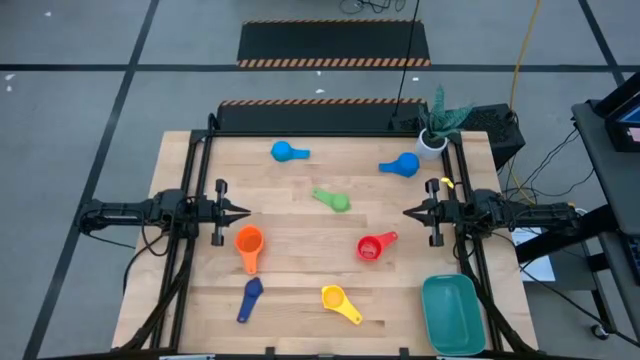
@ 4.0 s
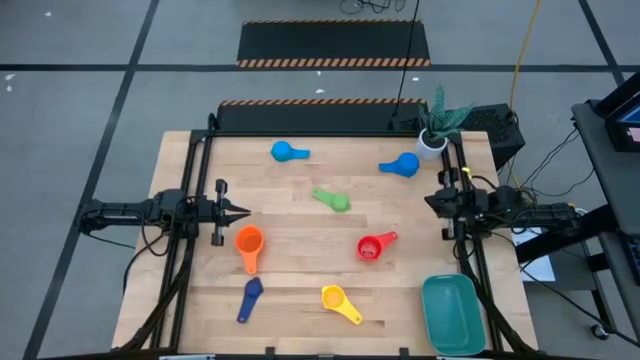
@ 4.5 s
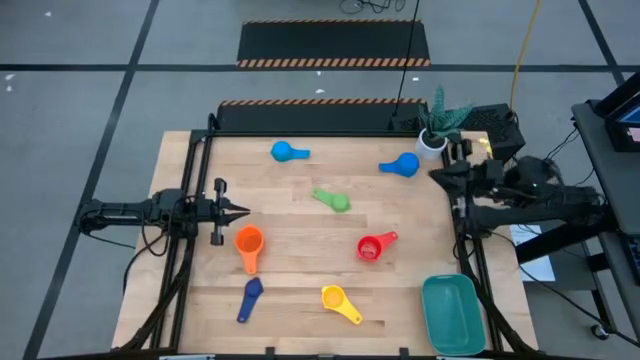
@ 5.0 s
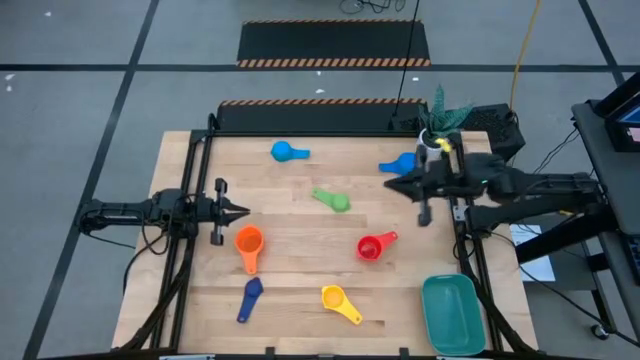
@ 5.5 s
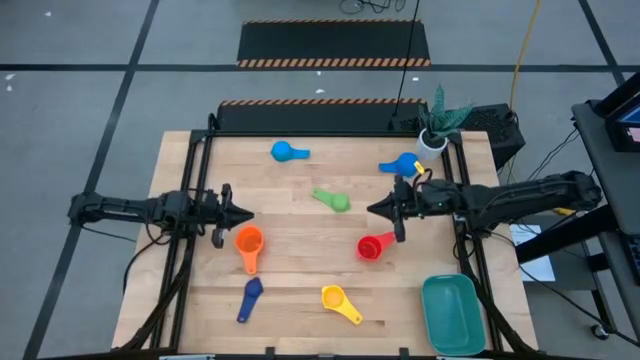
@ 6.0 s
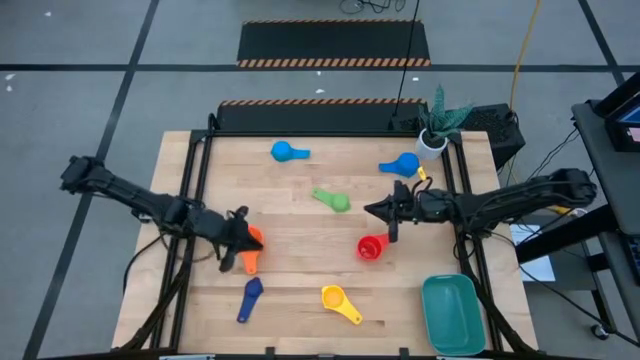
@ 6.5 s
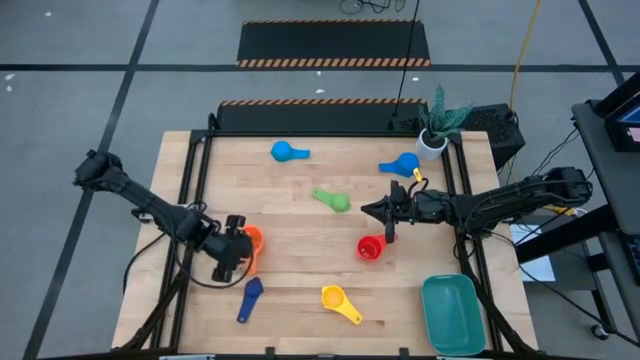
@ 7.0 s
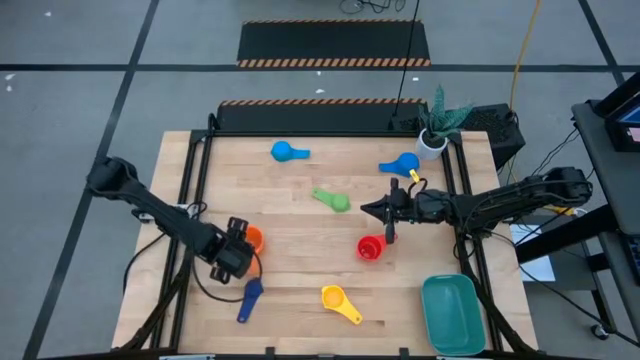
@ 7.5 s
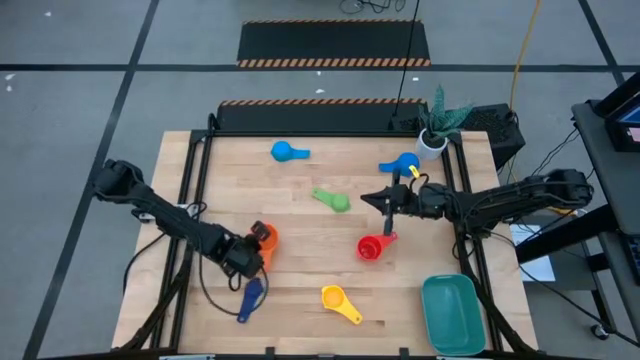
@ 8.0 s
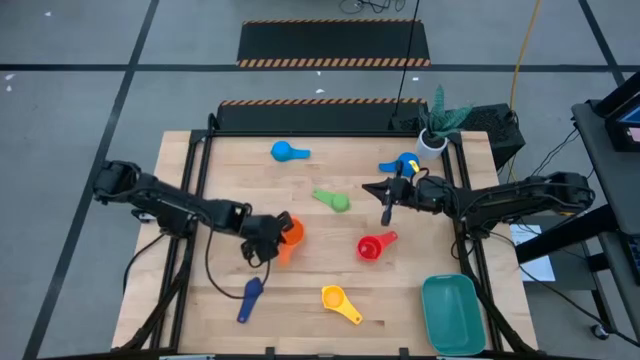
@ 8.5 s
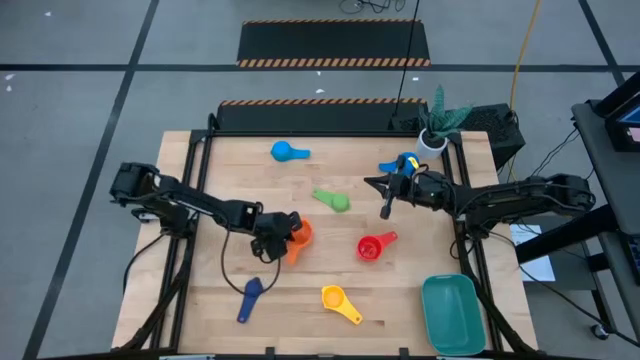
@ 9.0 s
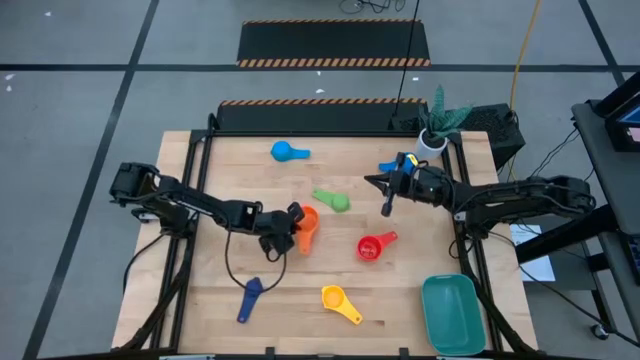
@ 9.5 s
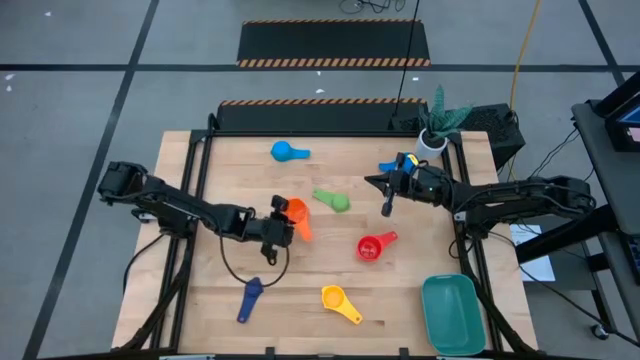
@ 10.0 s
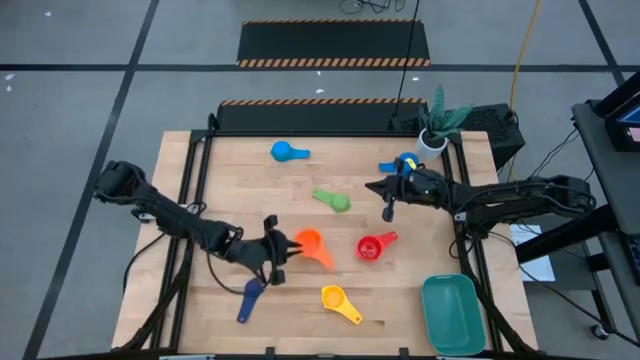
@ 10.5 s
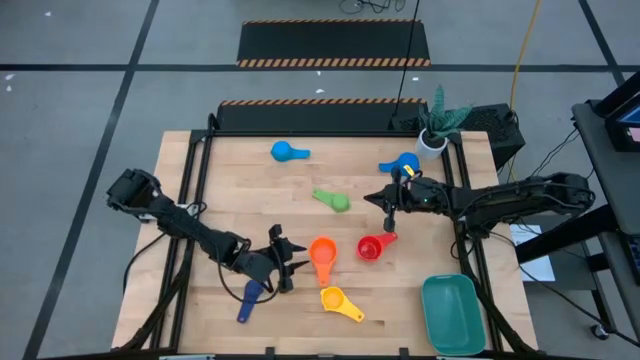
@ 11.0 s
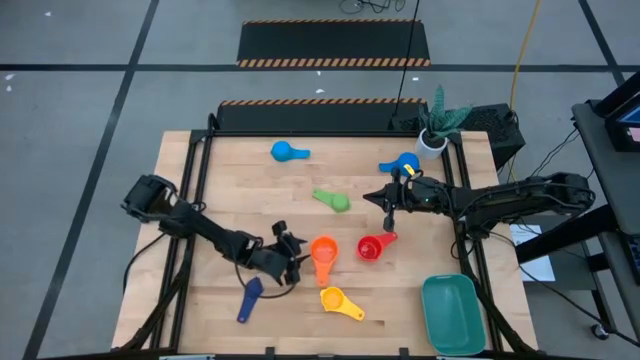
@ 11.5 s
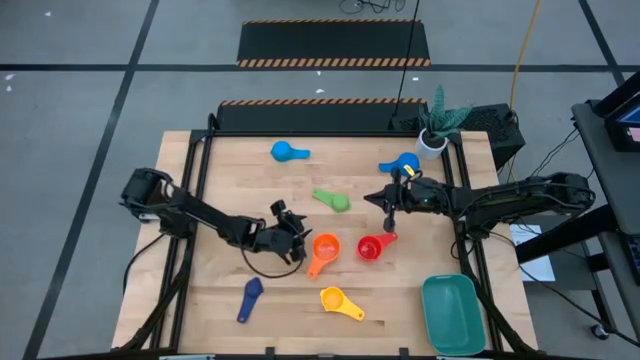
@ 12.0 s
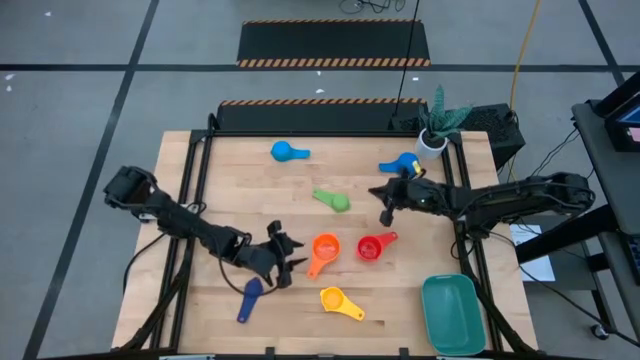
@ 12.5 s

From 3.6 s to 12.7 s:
Task: Nest measuring cups in basket
Move the orange measuring cup to the center of the table

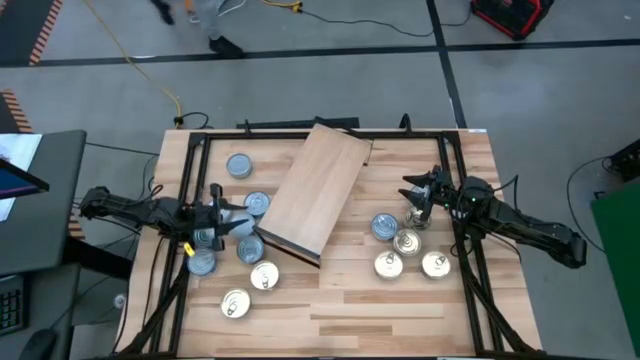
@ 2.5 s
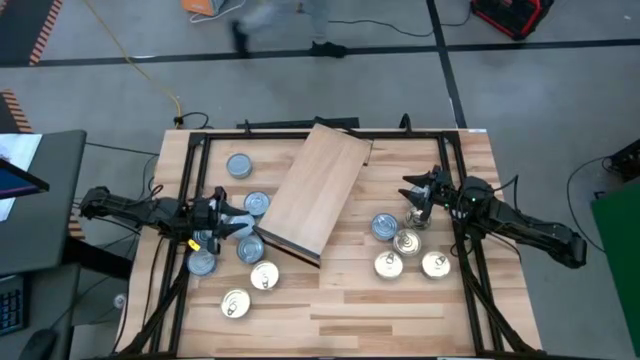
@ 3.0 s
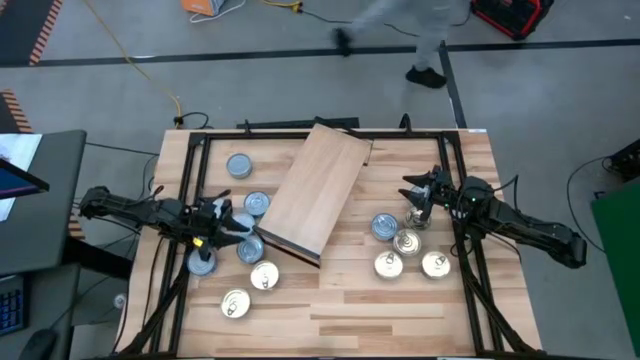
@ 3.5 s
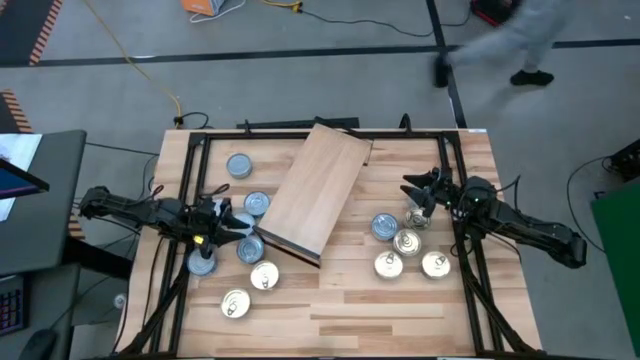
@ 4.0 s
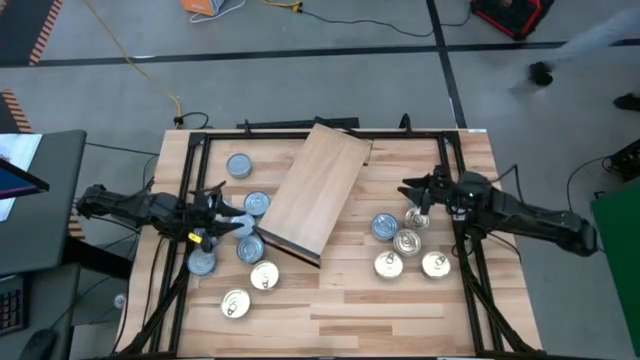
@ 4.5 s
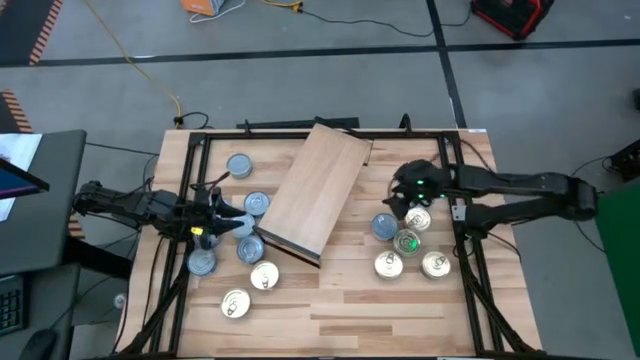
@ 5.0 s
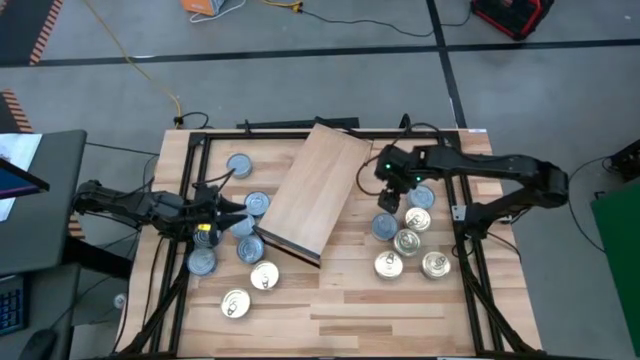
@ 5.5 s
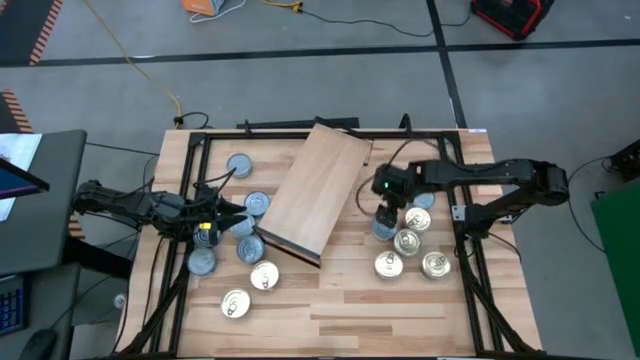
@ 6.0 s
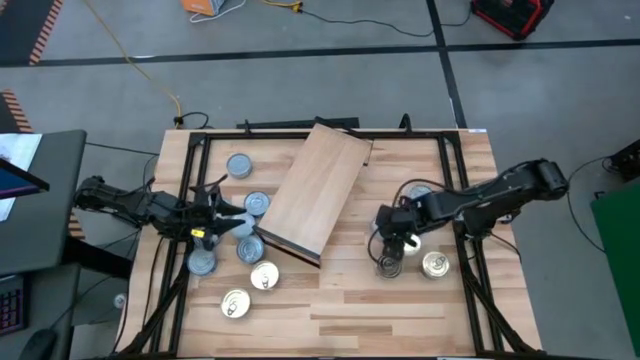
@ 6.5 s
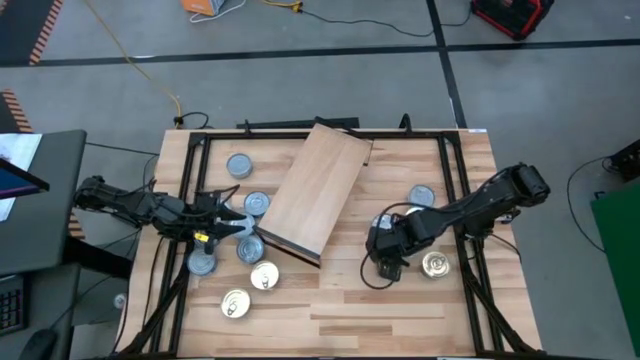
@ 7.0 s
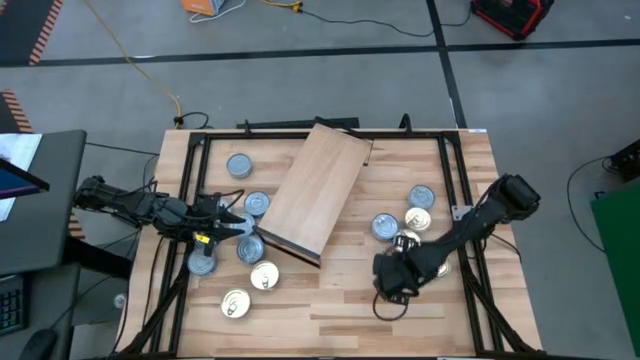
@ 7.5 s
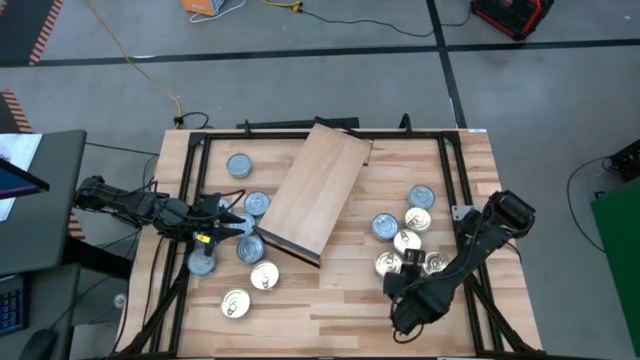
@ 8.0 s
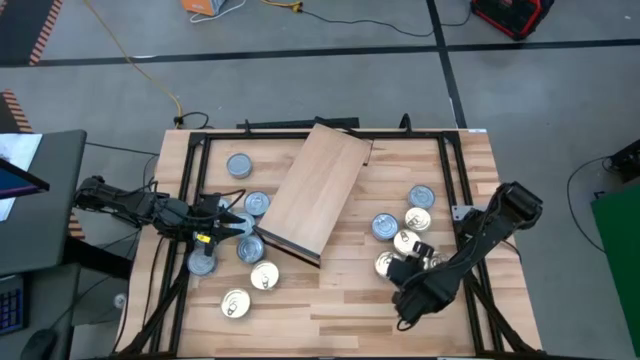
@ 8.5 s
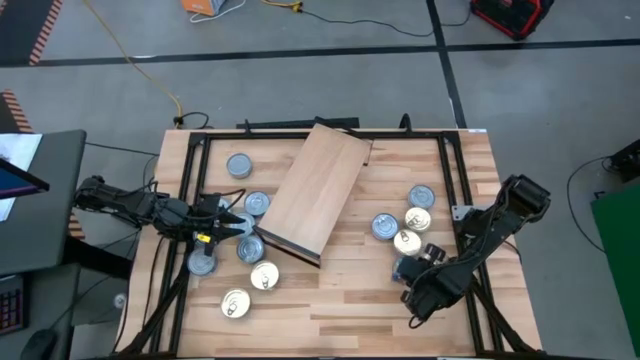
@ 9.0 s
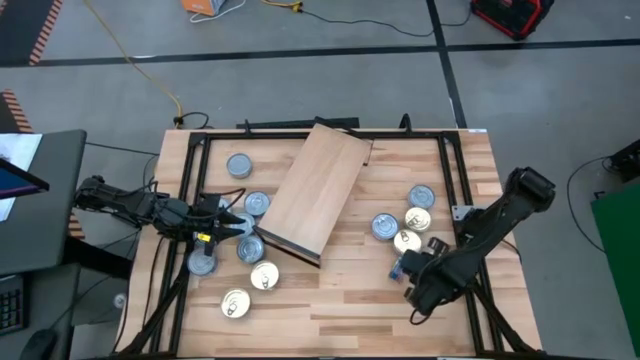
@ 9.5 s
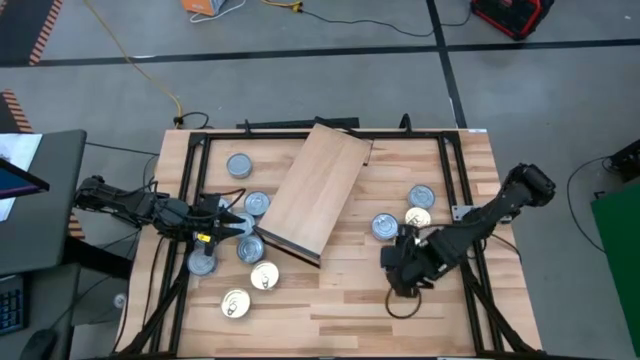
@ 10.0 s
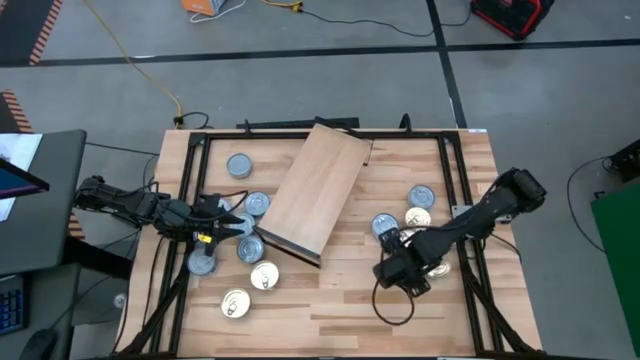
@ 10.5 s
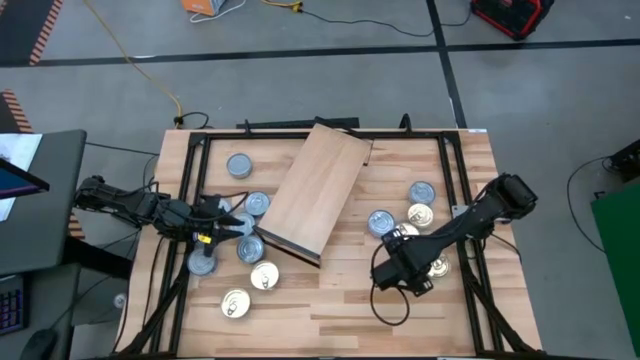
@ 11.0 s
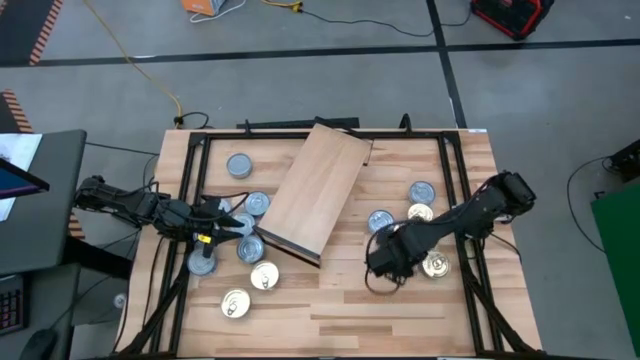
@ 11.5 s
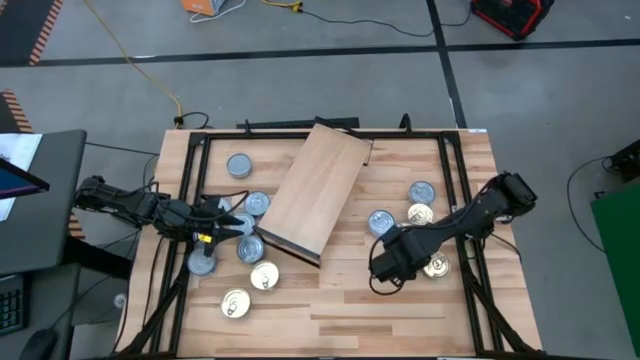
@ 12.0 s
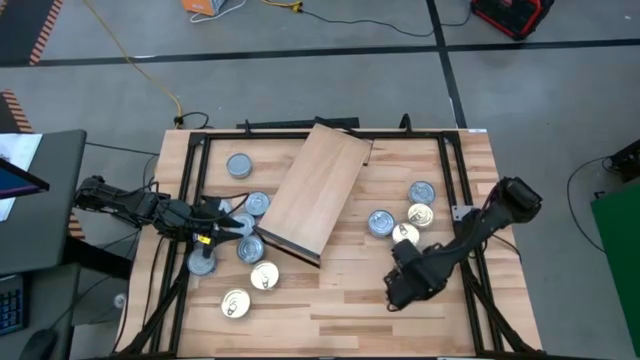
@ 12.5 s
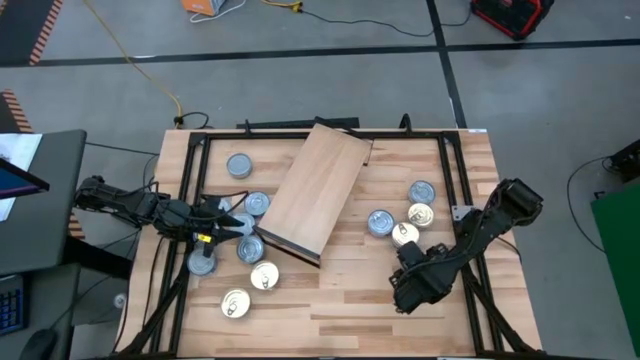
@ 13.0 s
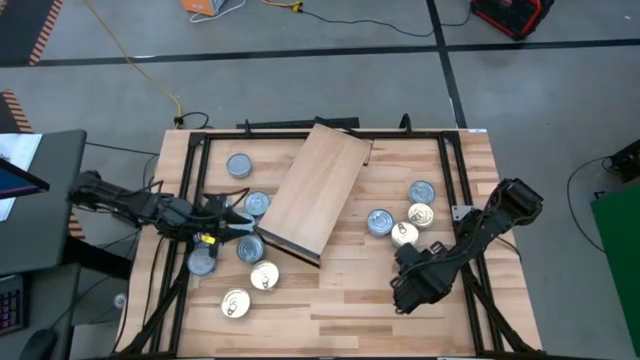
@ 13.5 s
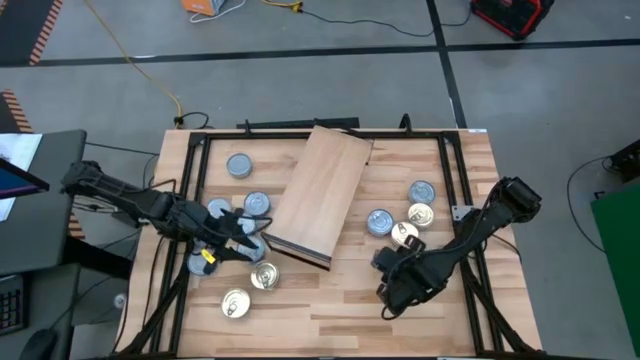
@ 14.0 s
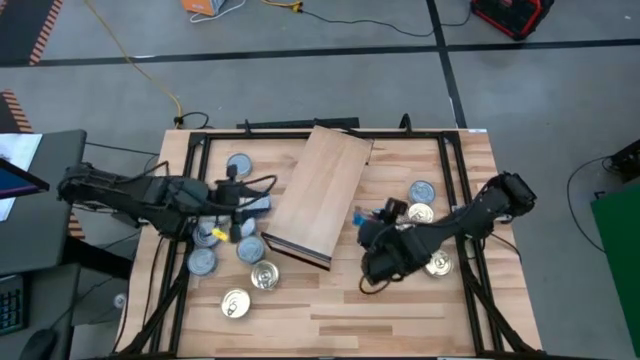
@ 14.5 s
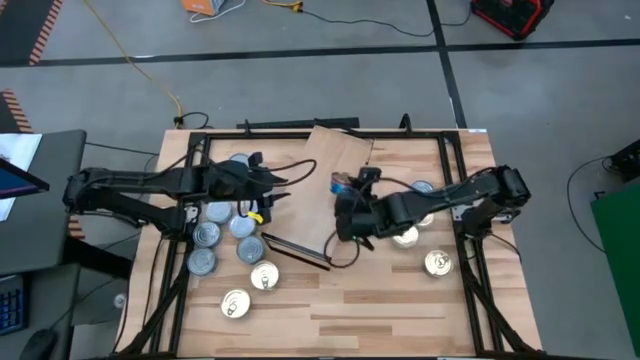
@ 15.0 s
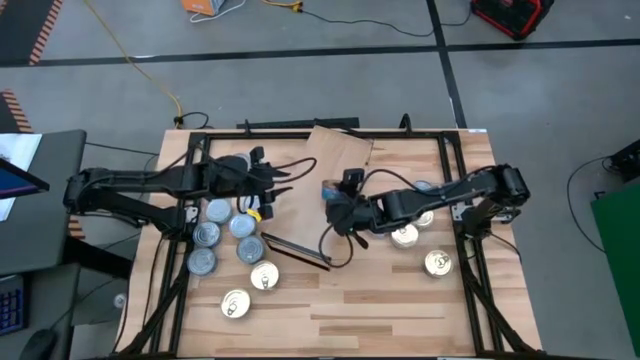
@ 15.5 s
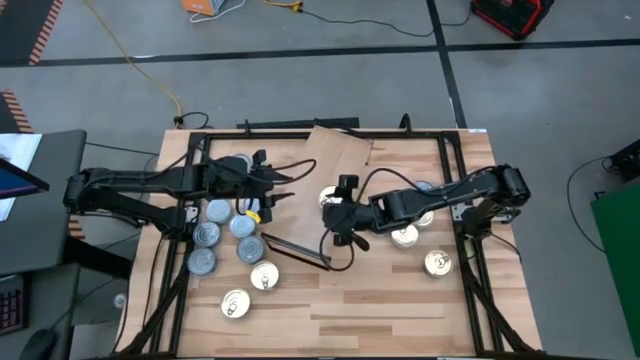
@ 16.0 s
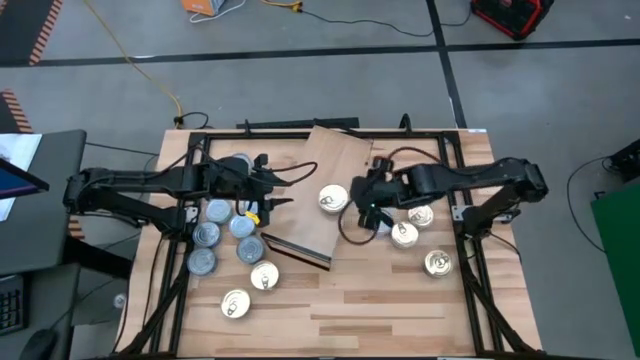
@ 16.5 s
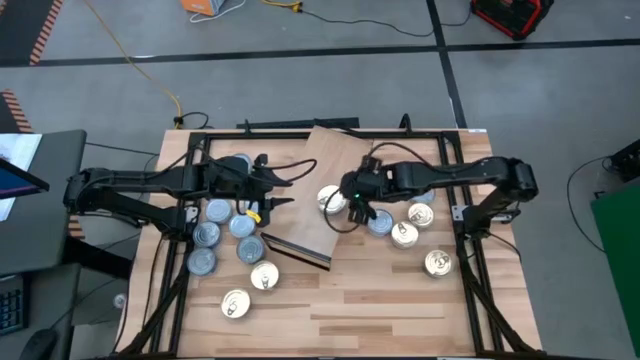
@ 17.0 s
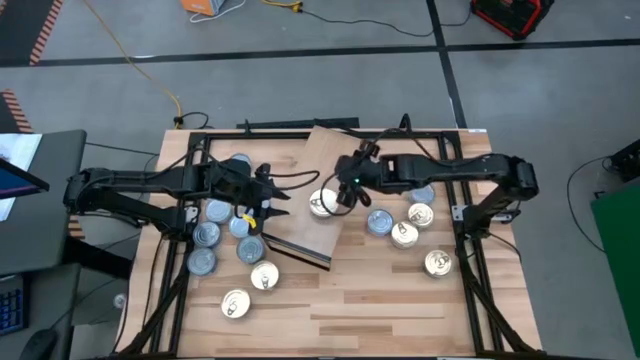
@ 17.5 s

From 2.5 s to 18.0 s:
Task: Stack canned seafood by type on shelf
Put the blue pink tuna can on the shelf
